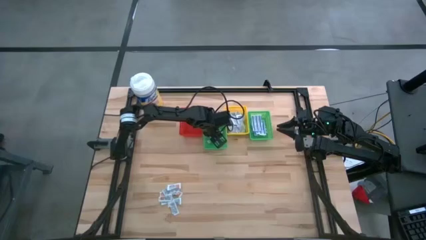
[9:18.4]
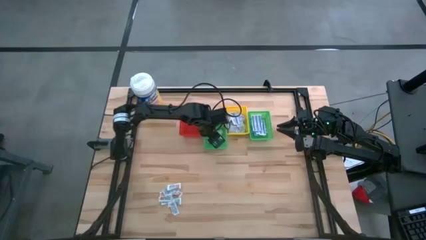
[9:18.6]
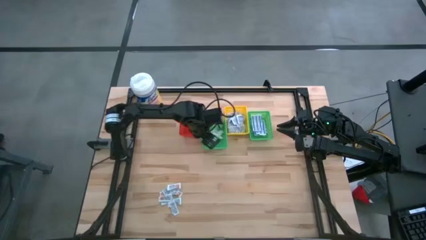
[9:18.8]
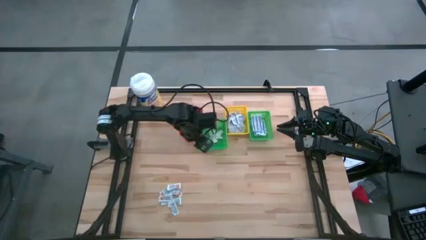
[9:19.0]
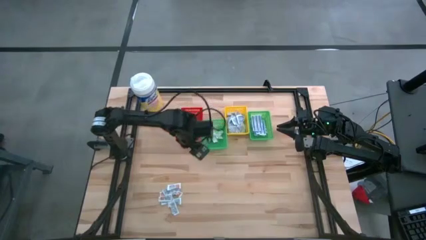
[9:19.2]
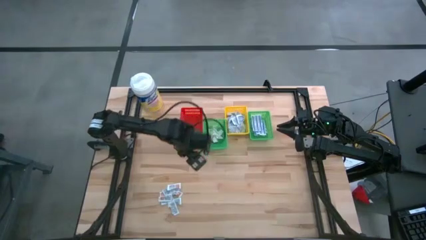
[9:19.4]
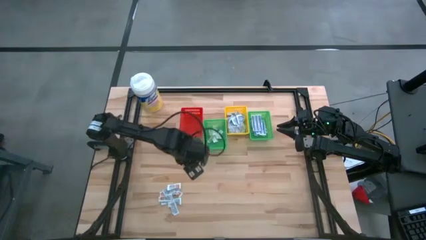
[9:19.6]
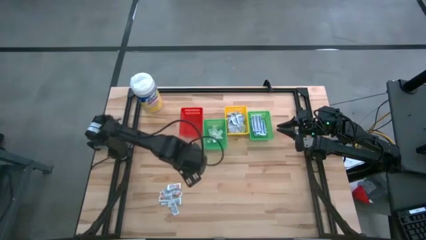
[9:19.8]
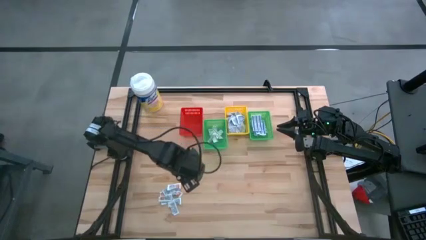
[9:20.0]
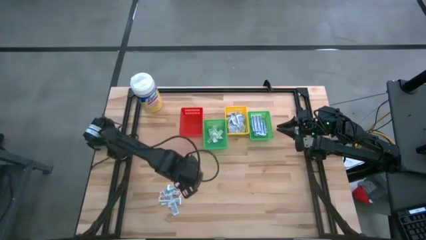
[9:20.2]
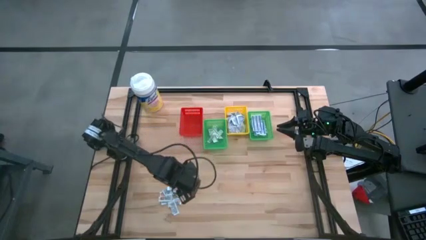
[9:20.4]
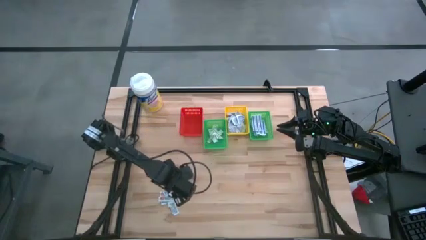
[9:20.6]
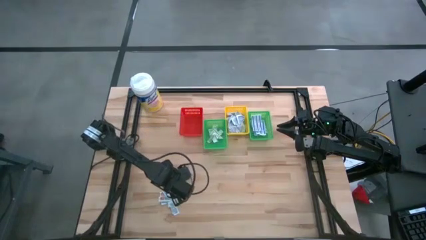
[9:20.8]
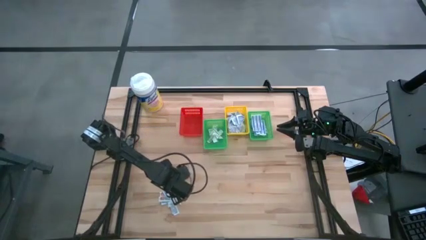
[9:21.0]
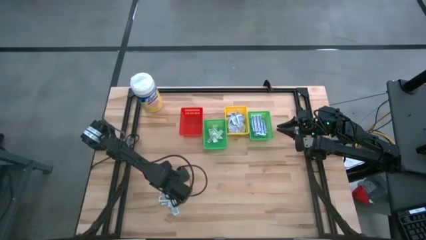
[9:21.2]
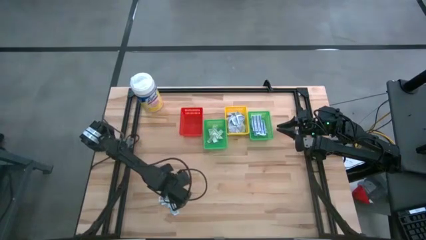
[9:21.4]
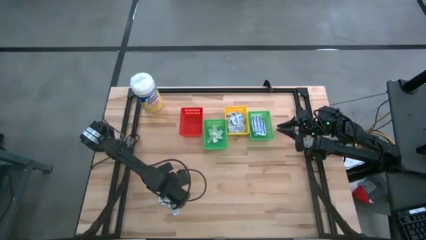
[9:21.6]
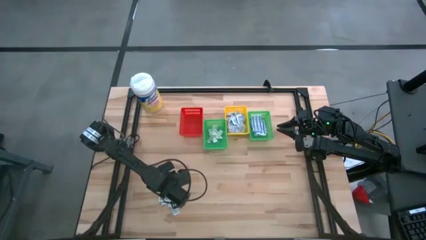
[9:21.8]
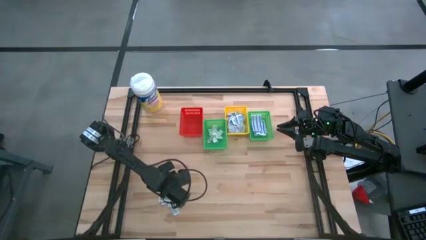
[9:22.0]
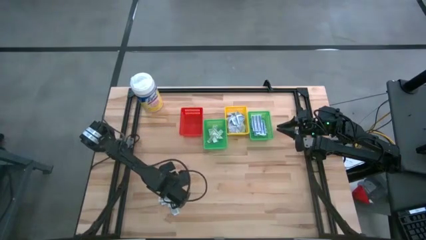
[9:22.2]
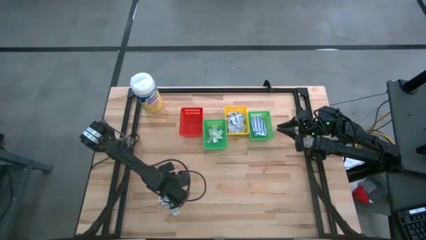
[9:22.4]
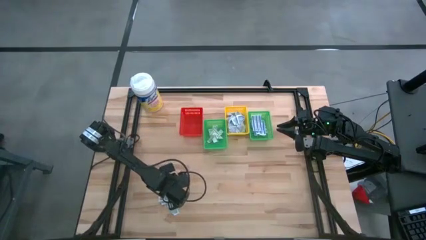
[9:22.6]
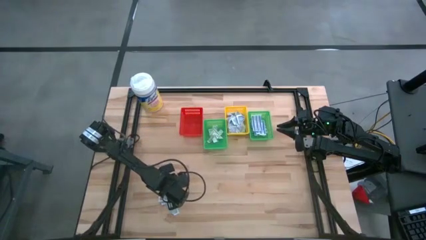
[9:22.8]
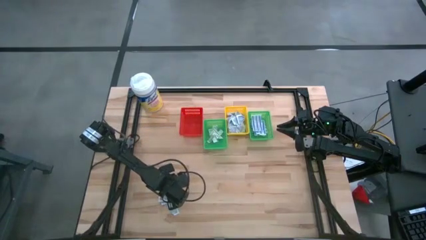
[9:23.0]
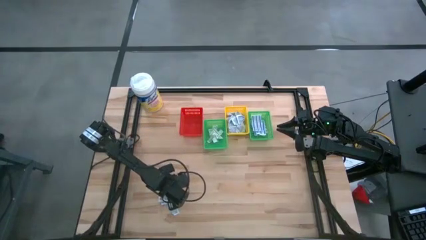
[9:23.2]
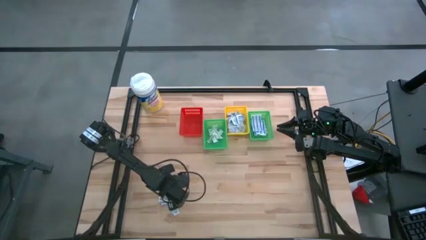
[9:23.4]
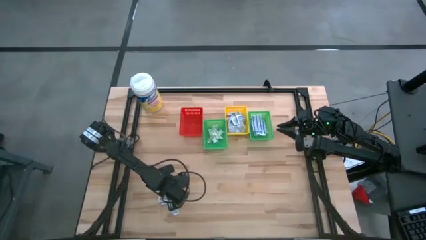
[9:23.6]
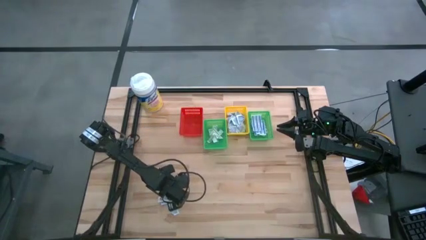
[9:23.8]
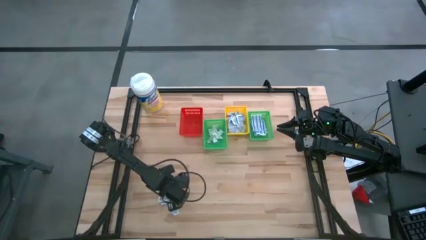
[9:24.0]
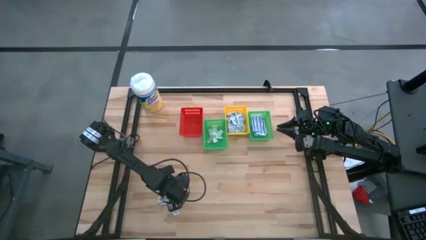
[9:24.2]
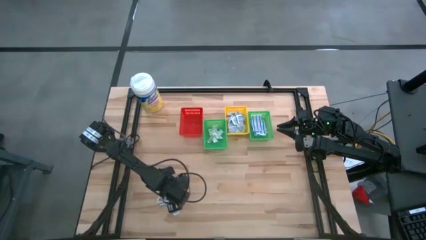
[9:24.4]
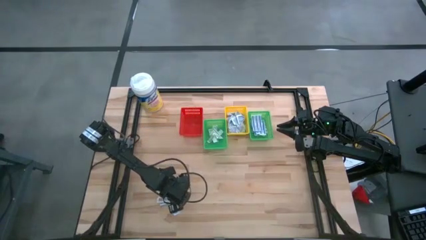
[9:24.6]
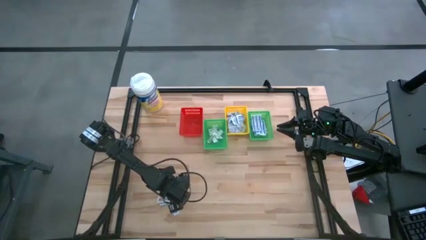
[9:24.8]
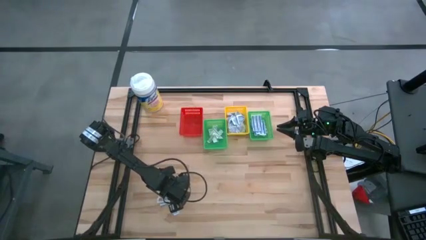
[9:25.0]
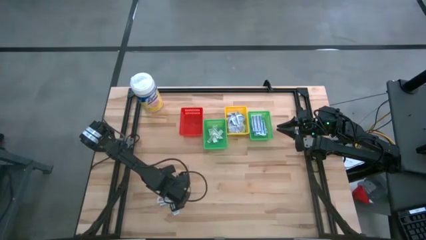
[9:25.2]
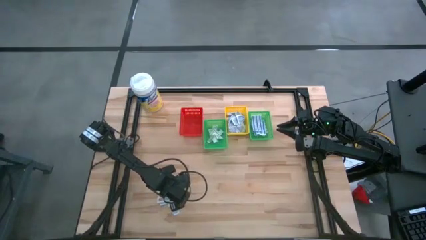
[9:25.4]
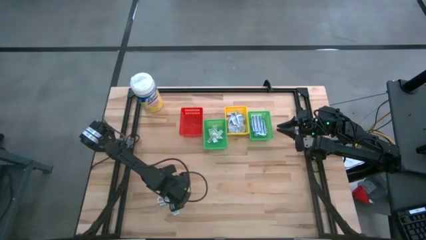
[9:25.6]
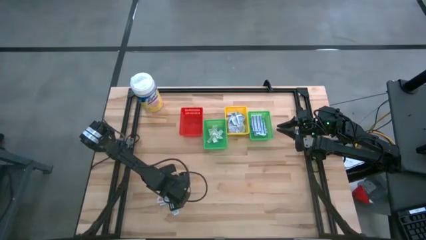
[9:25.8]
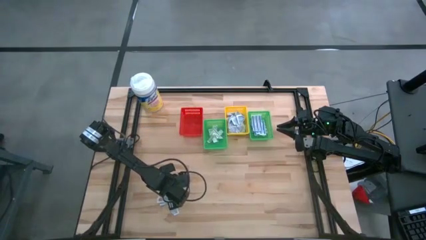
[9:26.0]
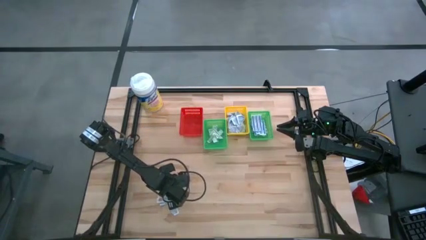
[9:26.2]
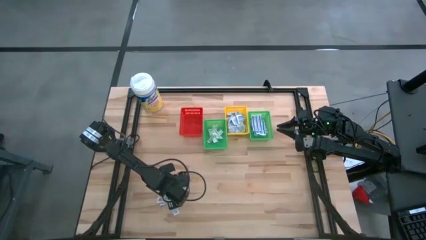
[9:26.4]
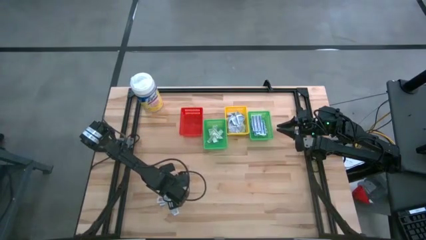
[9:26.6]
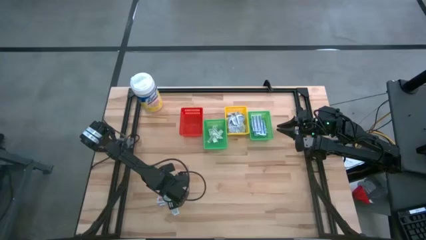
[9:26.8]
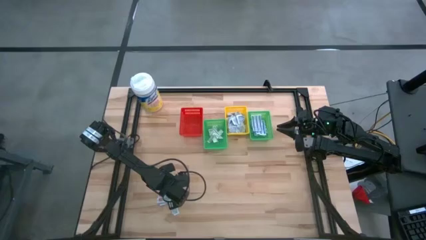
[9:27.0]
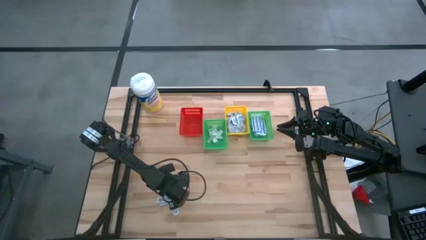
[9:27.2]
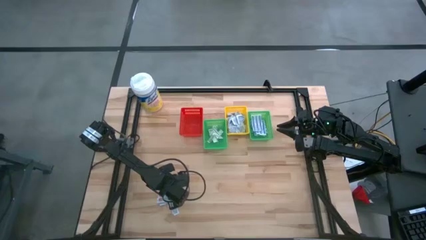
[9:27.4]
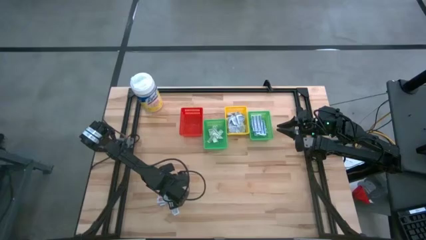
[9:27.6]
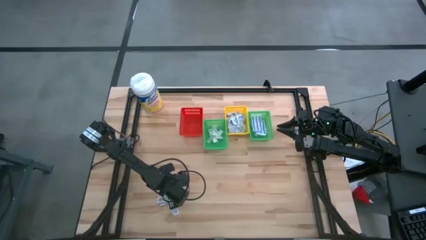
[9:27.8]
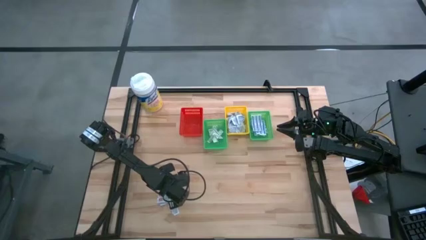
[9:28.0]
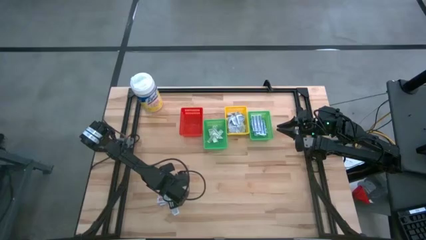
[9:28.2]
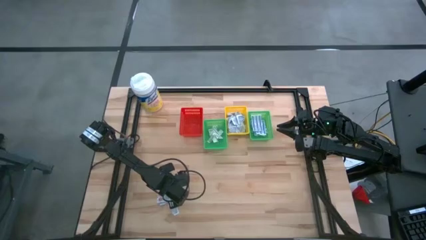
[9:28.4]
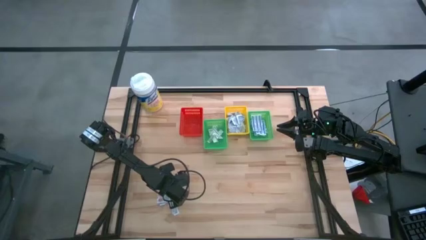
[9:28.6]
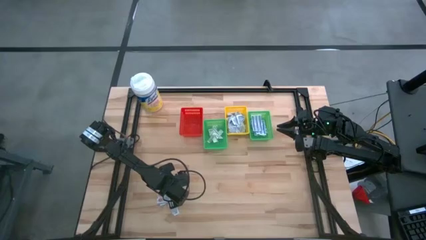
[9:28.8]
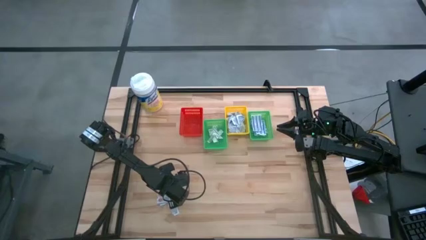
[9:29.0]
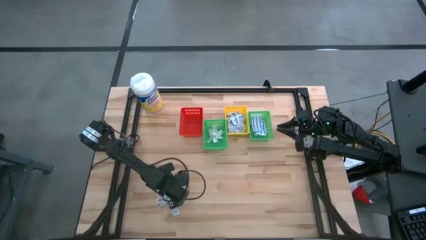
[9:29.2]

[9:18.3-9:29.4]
Task: Pick & Place First Aid Supplies
Put the ointment pack into the red basket

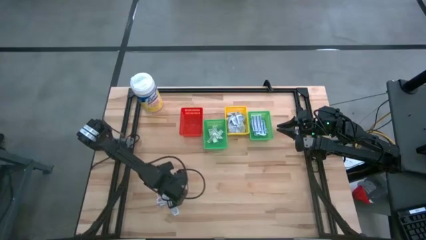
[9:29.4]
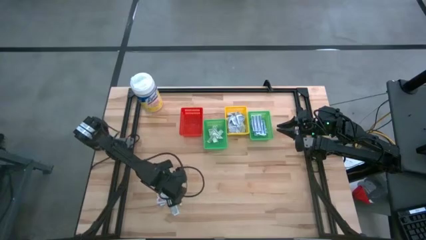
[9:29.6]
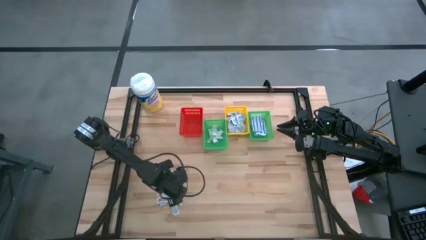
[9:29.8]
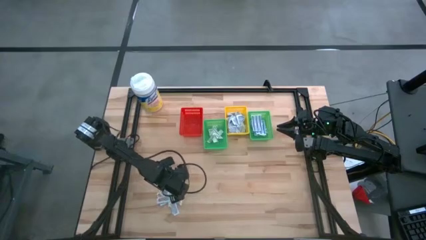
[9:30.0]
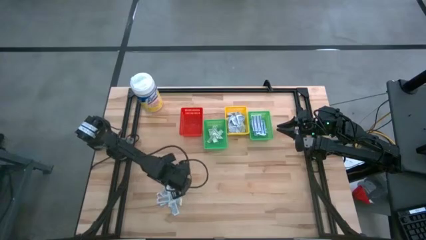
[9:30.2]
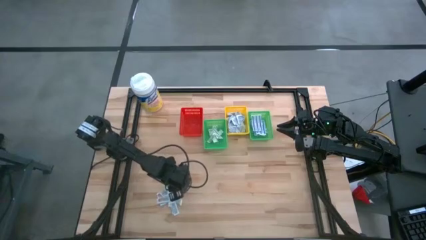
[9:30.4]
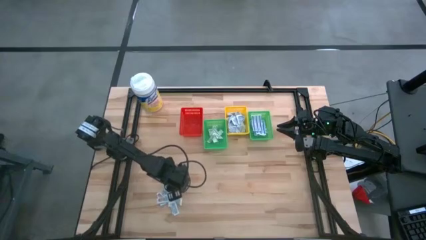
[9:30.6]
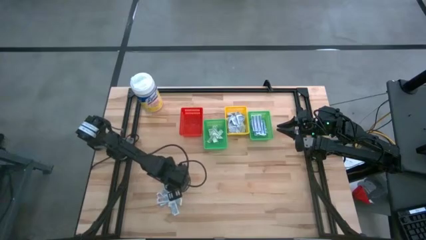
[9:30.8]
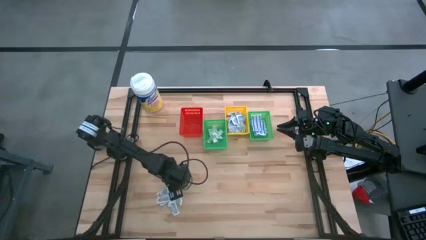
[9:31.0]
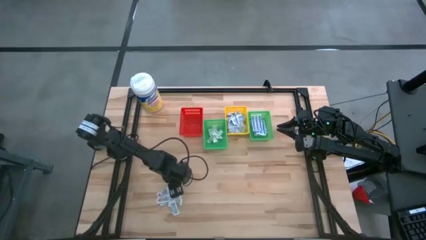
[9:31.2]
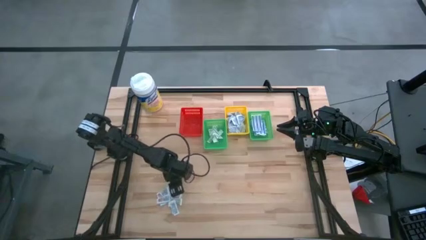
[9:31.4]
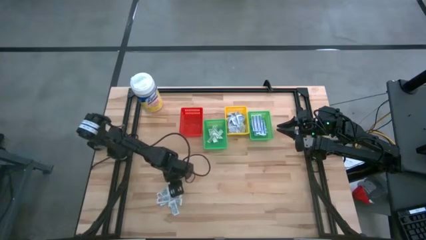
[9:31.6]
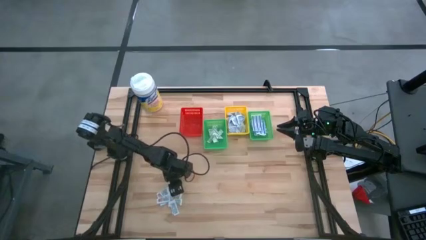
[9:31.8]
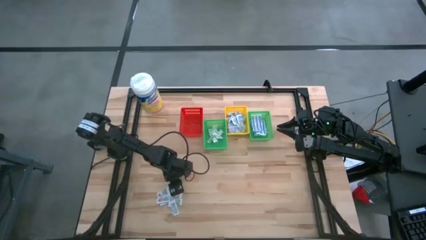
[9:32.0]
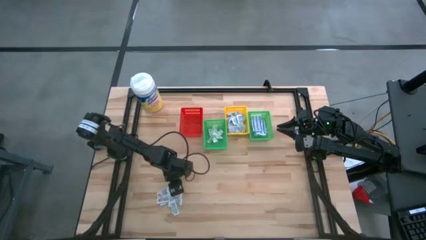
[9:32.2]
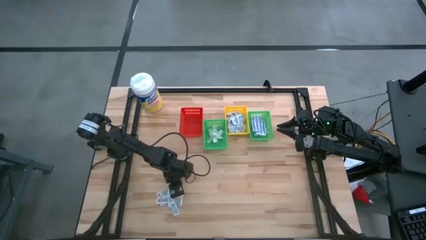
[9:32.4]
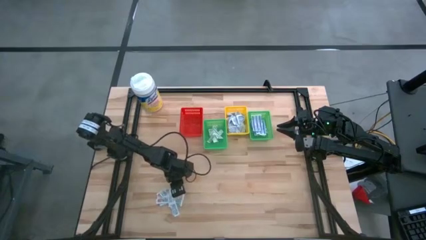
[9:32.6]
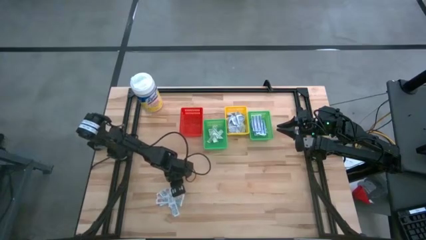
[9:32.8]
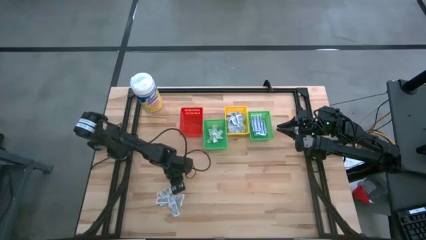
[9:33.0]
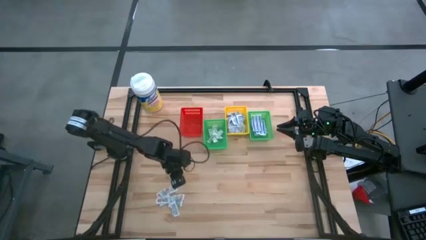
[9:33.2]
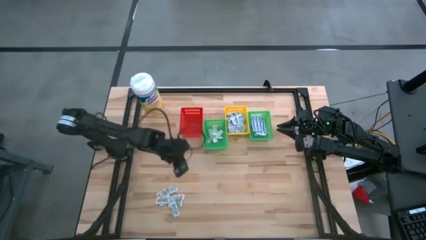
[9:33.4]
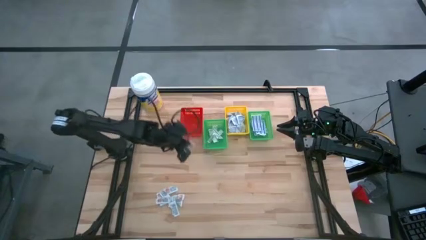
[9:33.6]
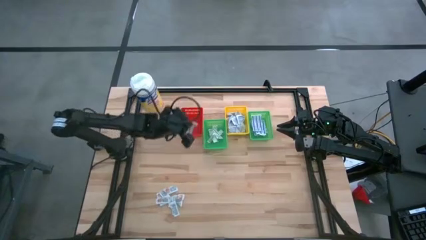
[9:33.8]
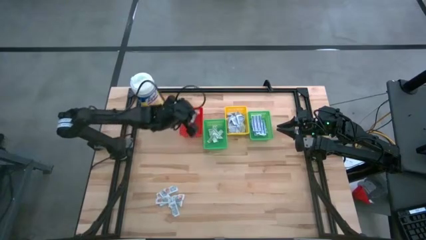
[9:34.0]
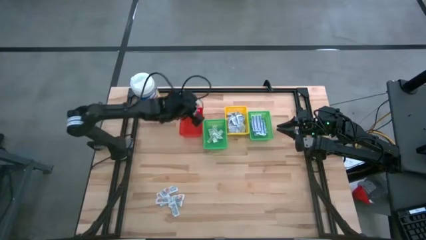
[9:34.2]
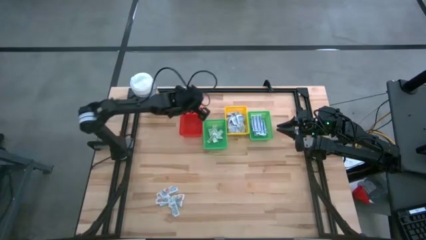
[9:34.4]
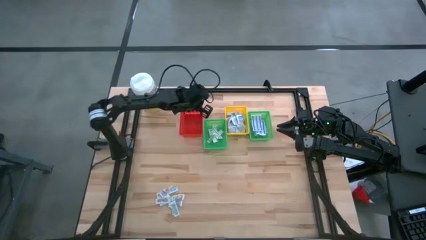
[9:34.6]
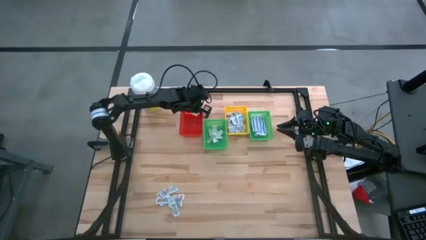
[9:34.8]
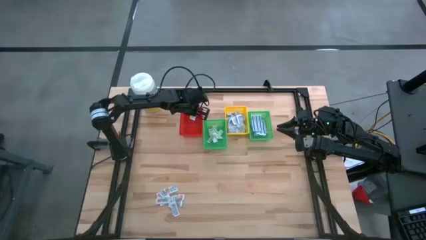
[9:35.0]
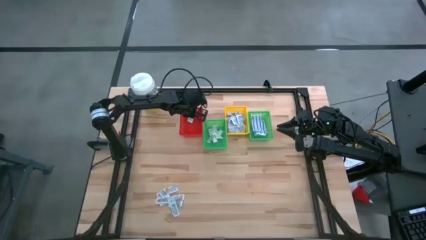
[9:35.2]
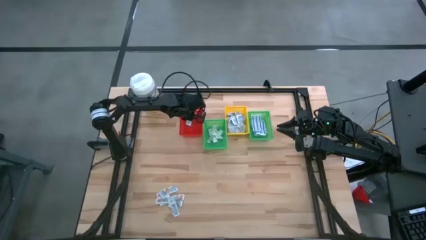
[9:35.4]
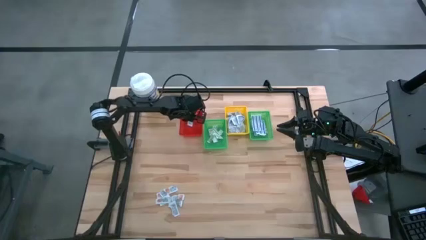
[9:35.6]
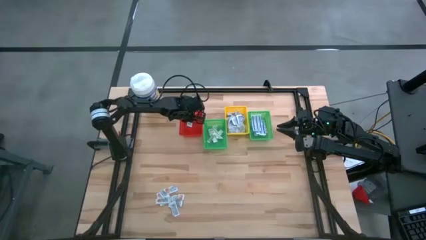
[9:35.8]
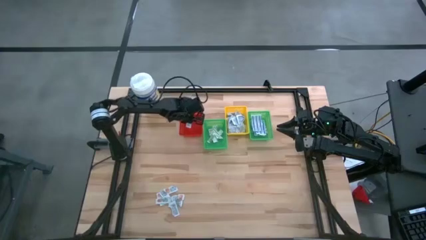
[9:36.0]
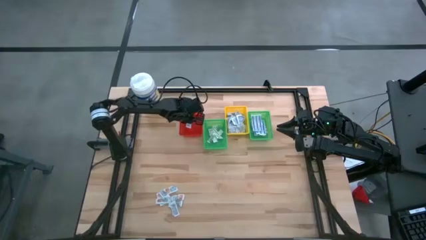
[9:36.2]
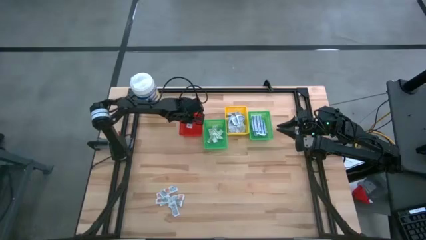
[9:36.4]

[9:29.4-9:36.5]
Put the ointment pack into the red basket
